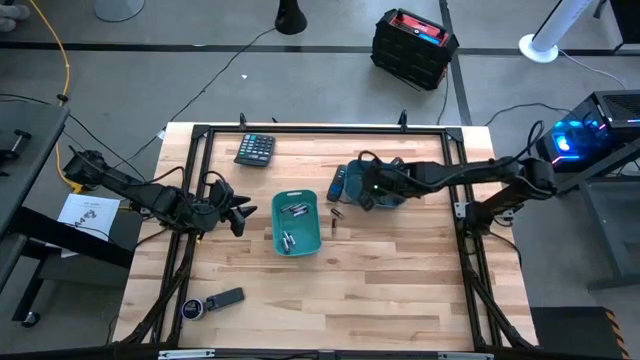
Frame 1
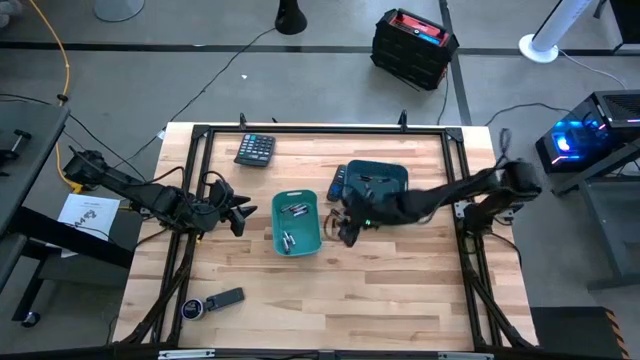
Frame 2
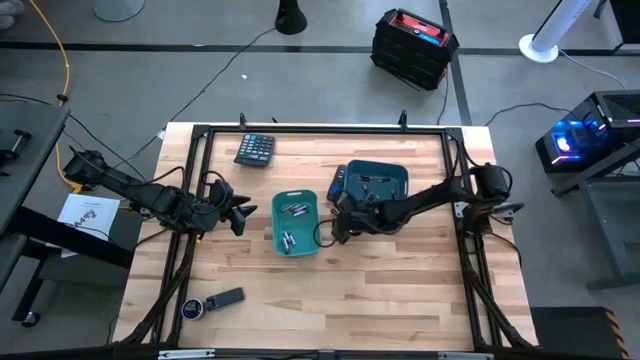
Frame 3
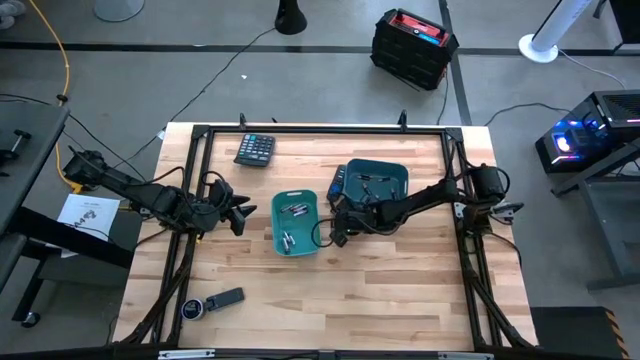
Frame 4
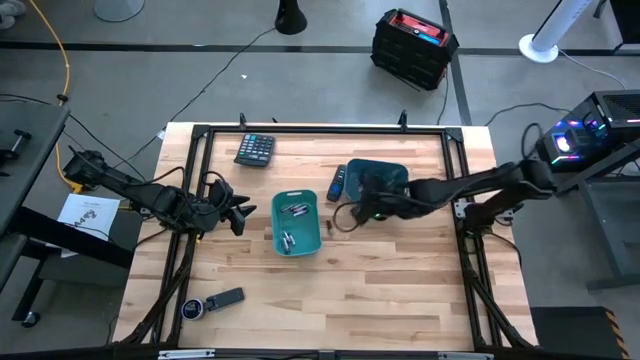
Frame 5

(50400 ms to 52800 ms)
Task: Sort batteries
Put the black battery into the blue bin

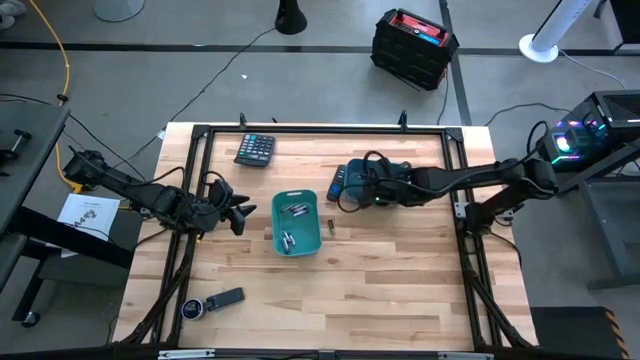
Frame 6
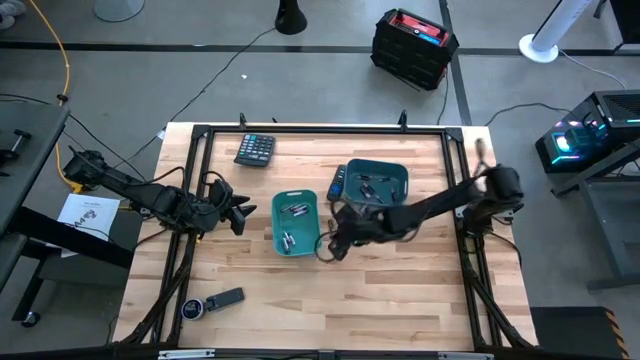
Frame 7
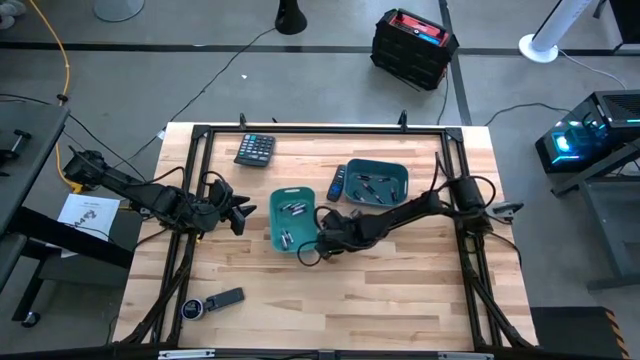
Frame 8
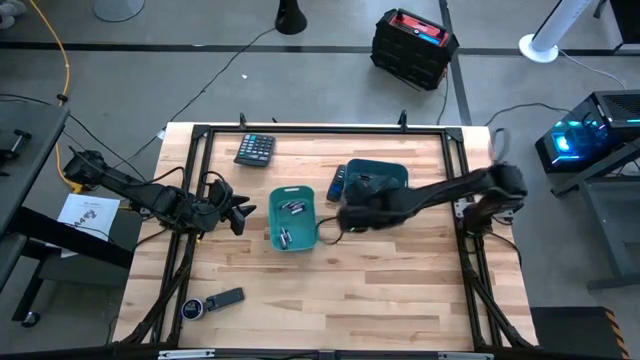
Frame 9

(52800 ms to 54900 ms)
Put the black battery into the blue bin

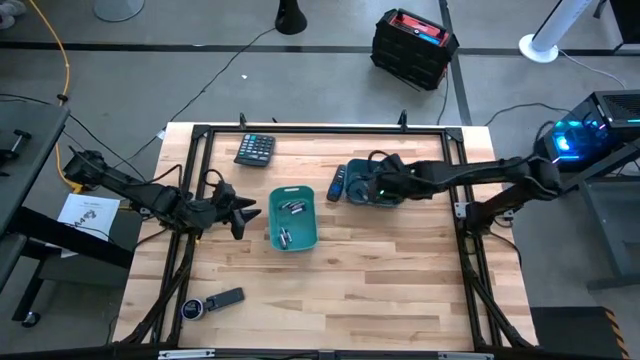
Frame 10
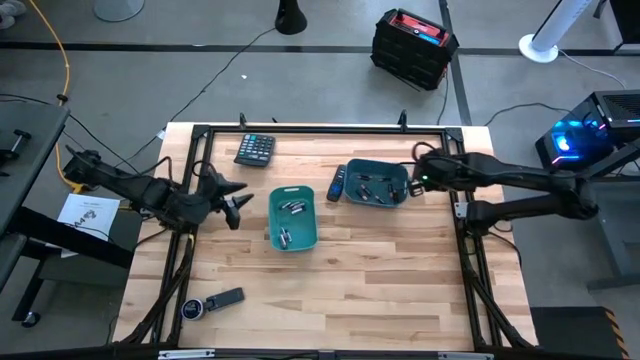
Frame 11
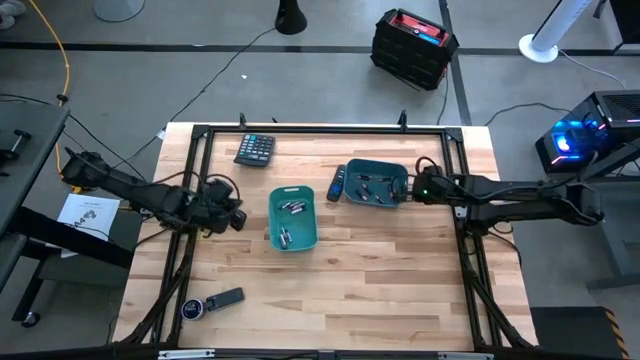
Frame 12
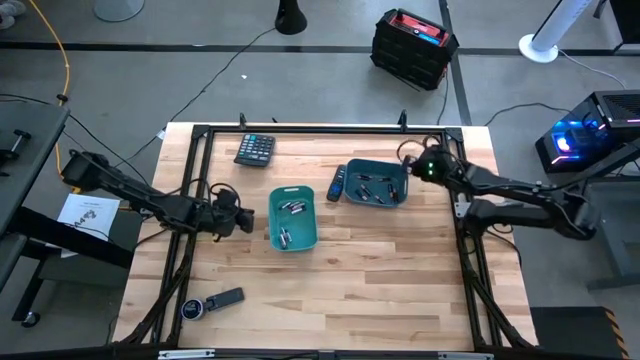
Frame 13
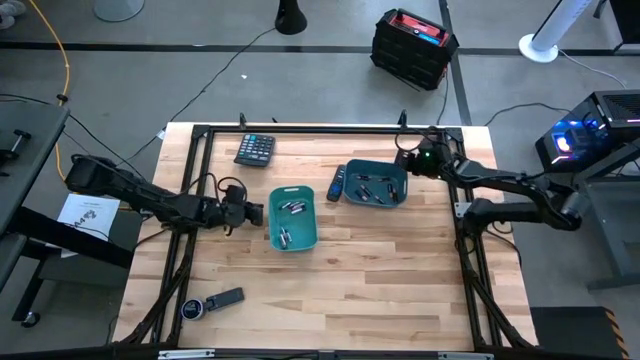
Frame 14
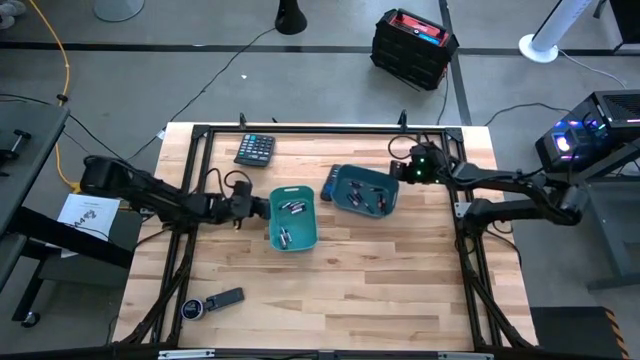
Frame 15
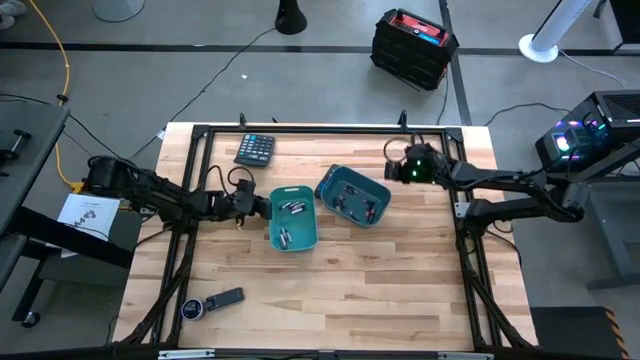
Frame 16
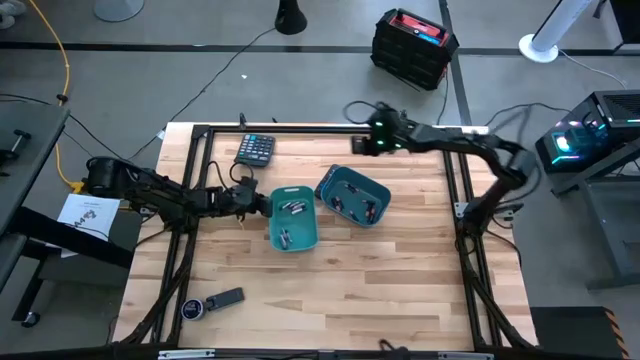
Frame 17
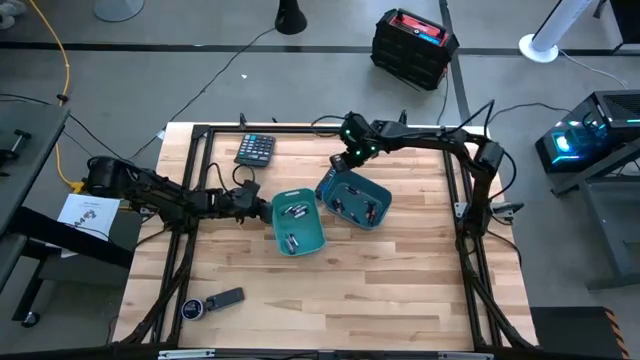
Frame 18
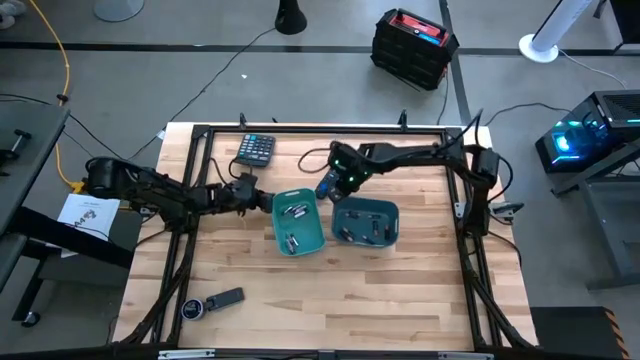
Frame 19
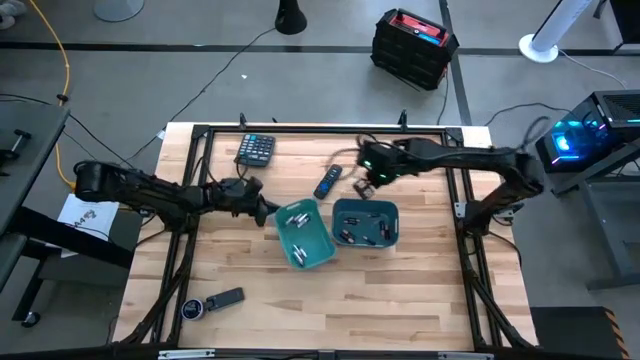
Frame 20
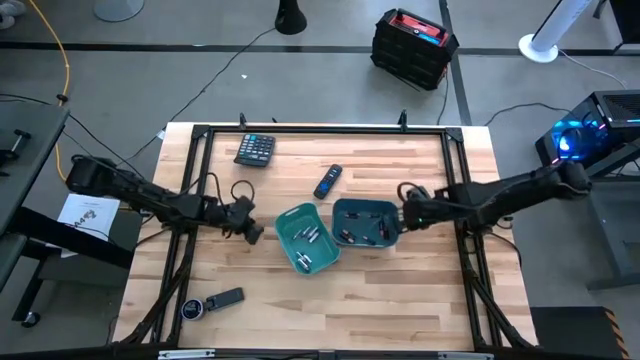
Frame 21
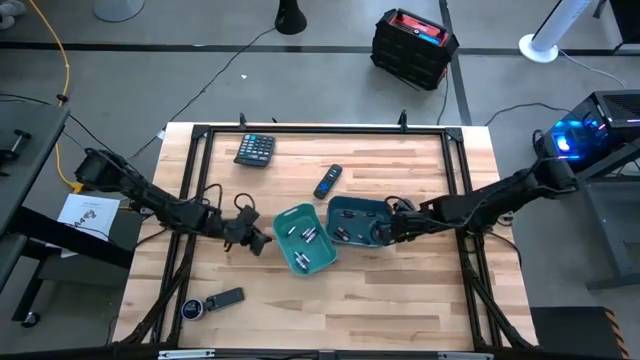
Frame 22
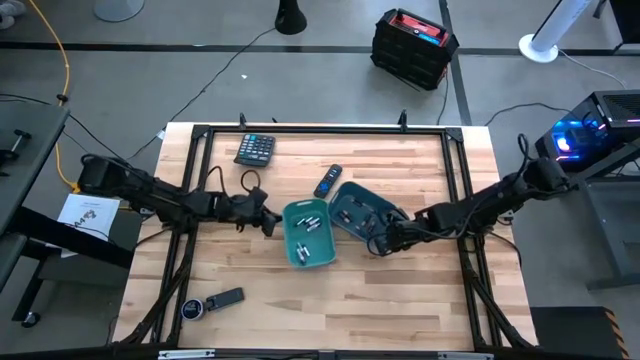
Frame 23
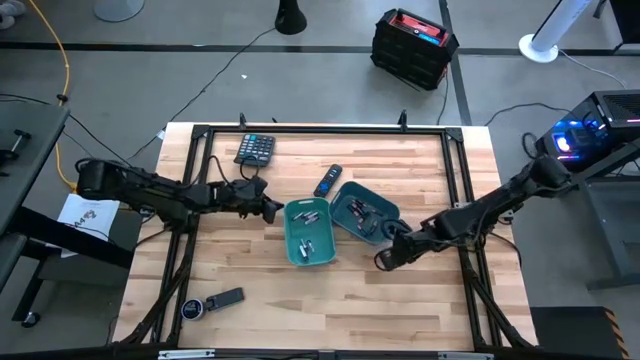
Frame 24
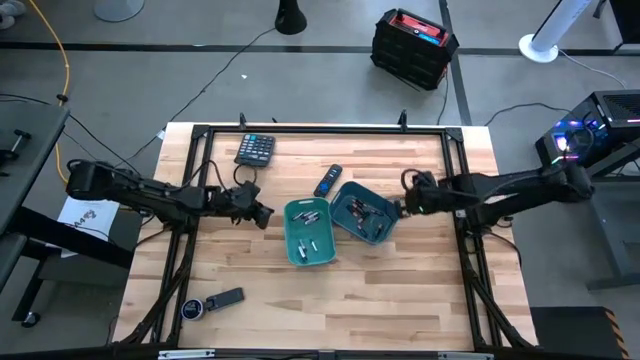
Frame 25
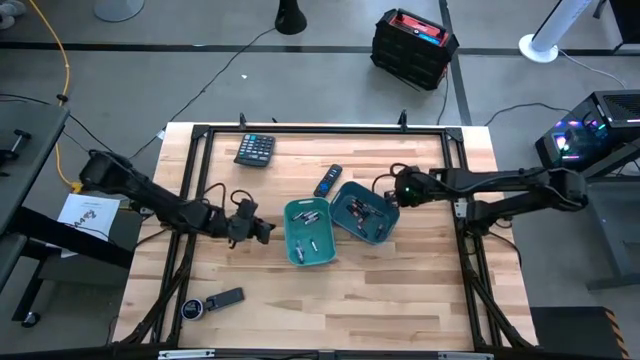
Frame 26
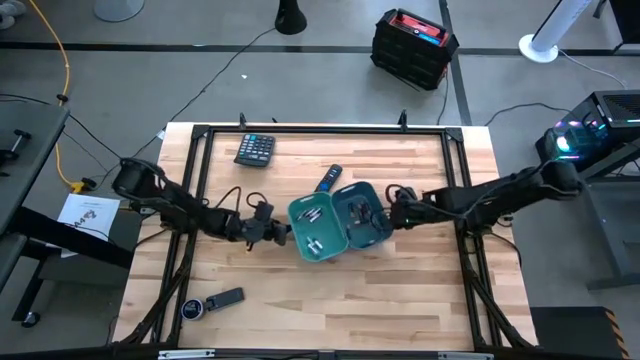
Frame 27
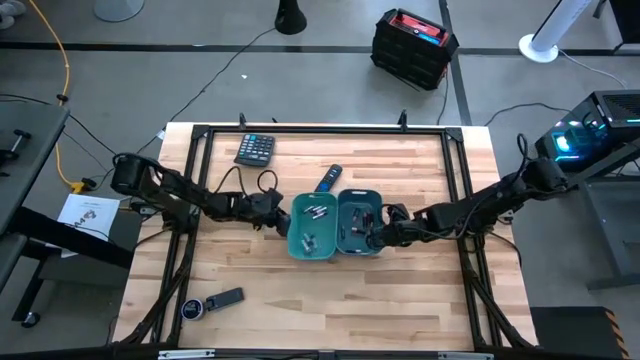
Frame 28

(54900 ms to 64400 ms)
Adjust the bins

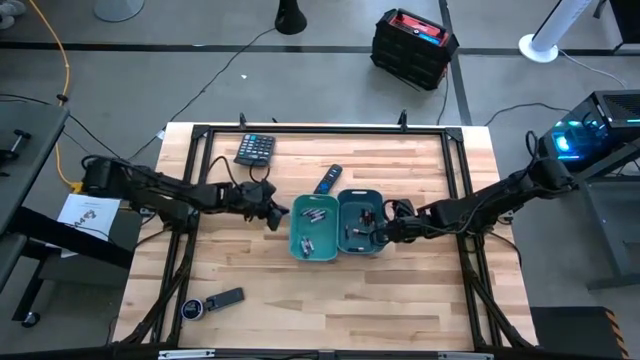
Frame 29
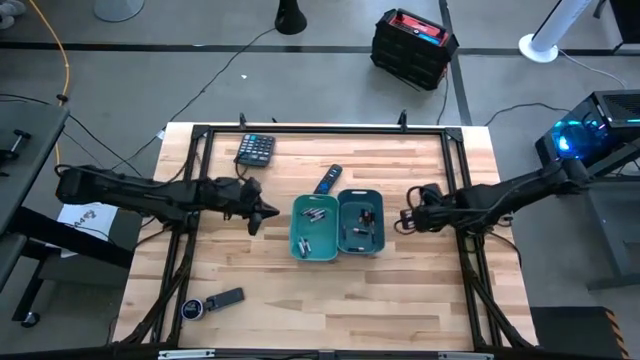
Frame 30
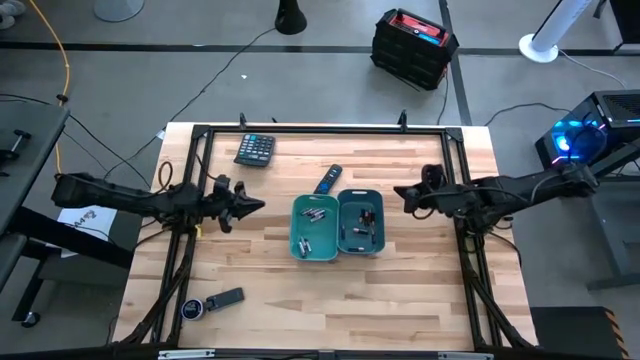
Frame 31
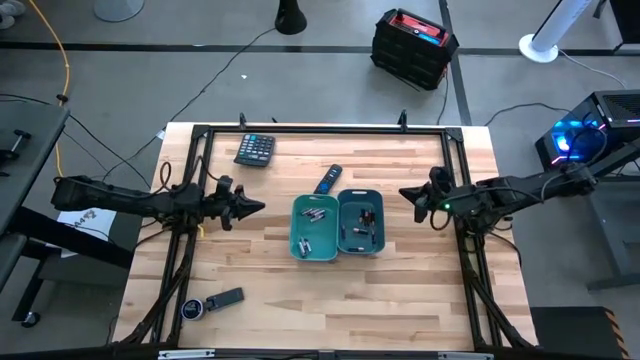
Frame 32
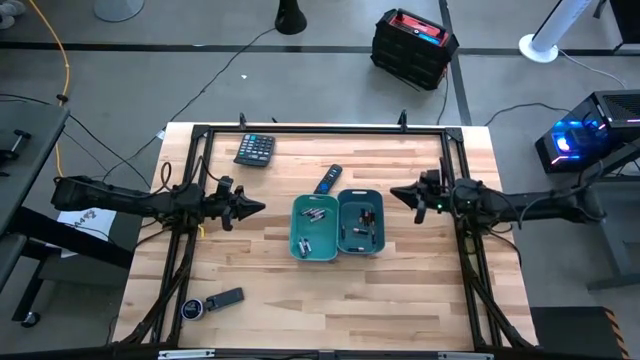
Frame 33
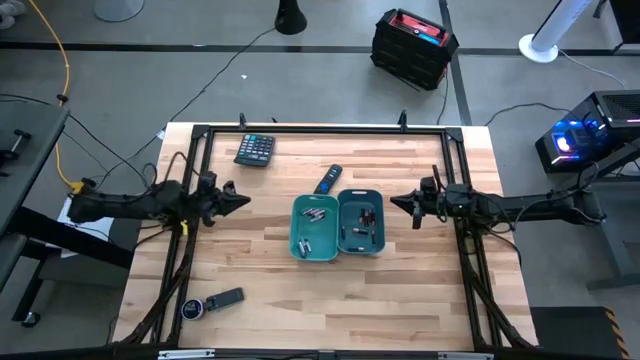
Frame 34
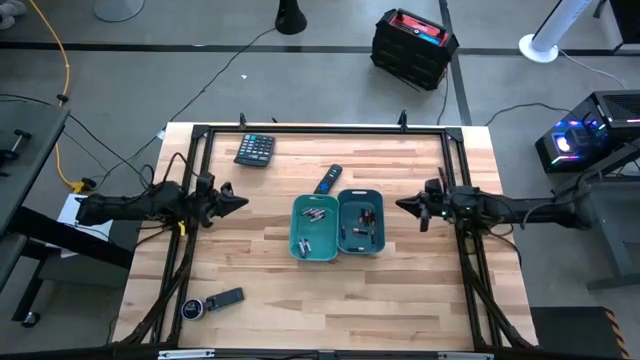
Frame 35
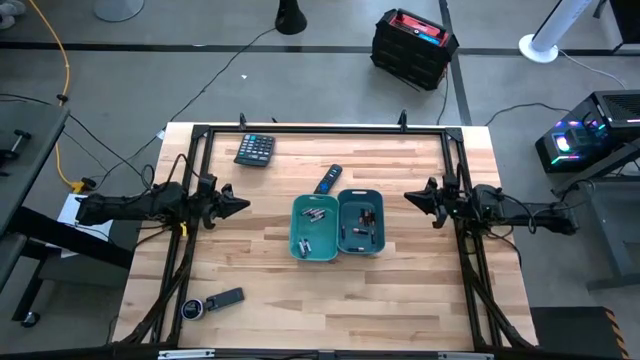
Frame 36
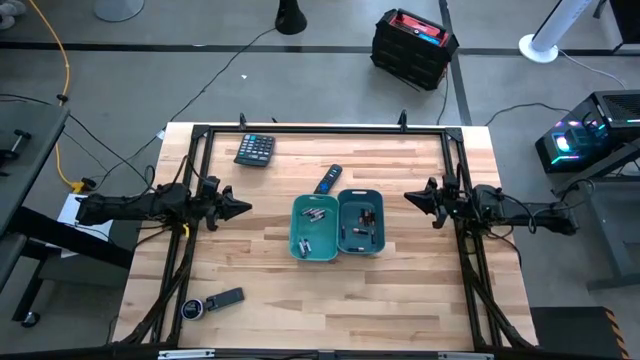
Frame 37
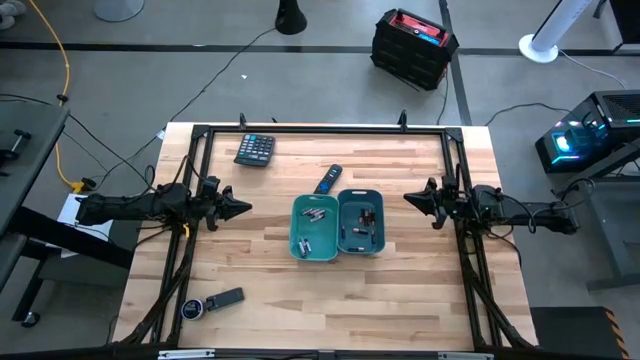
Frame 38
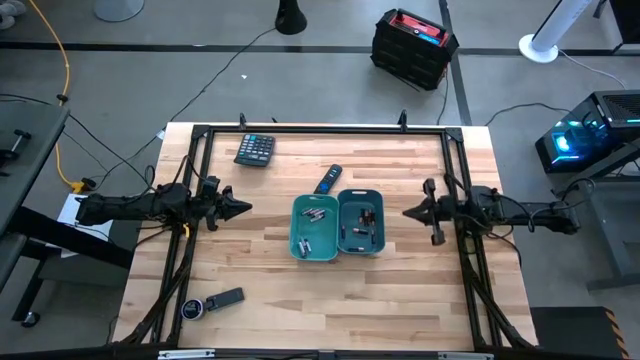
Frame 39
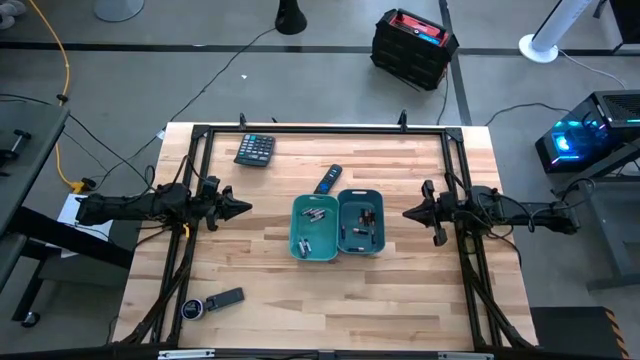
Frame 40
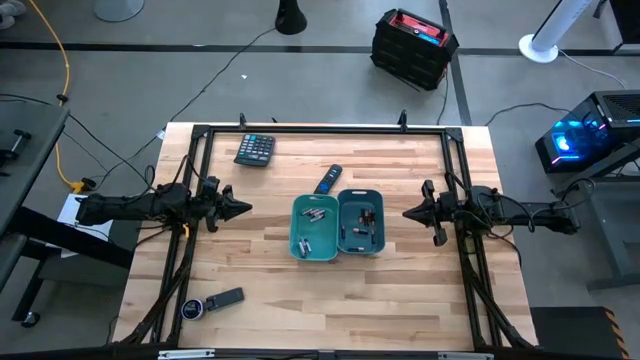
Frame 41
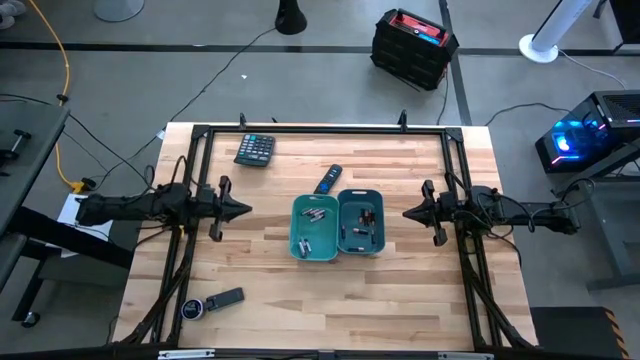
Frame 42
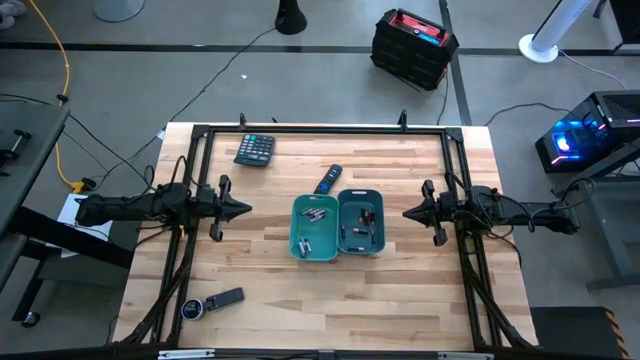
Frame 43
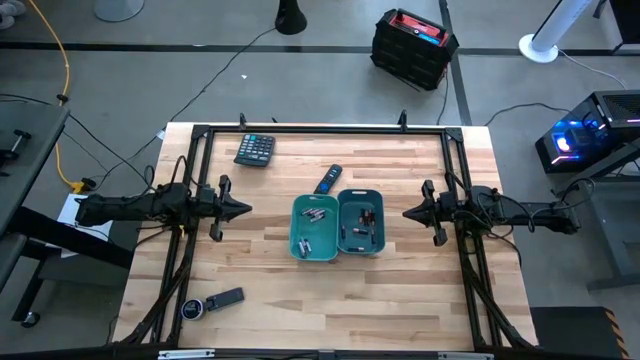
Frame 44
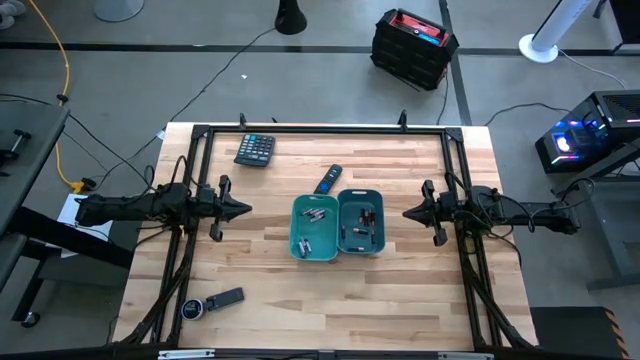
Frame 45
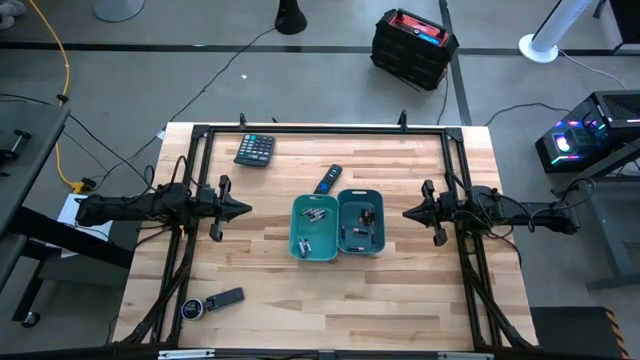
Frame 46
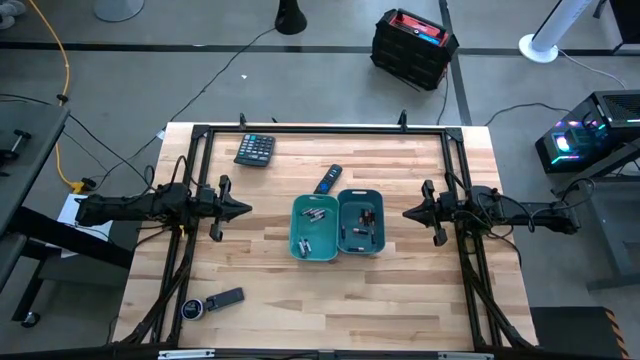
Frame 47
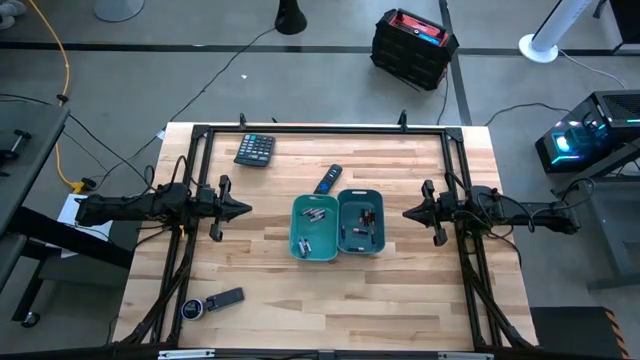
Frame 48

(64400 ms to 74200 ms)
Return to Home Position
